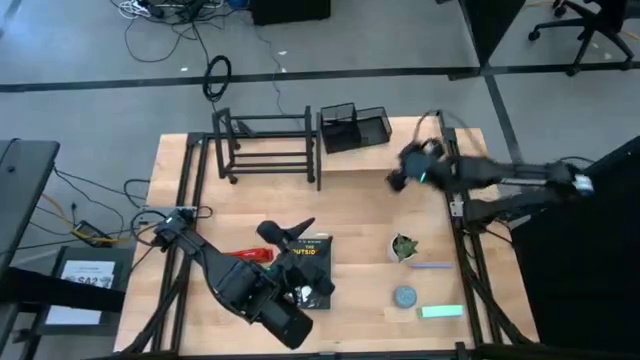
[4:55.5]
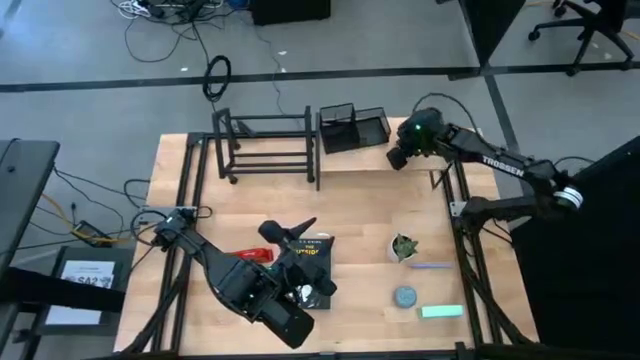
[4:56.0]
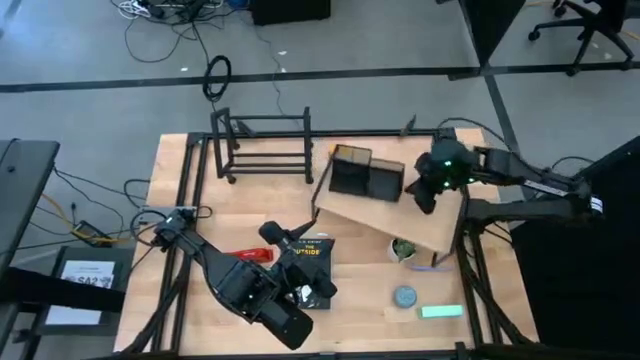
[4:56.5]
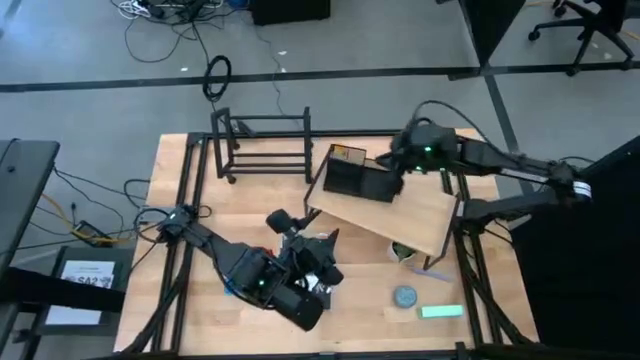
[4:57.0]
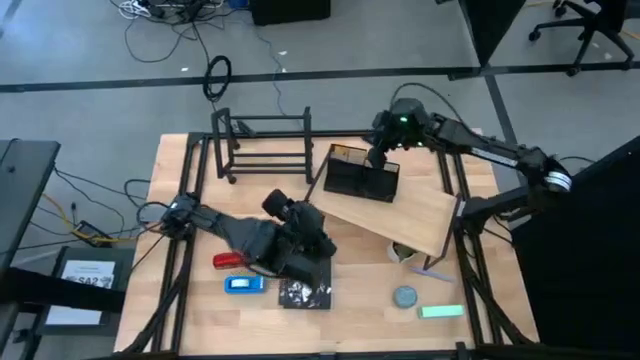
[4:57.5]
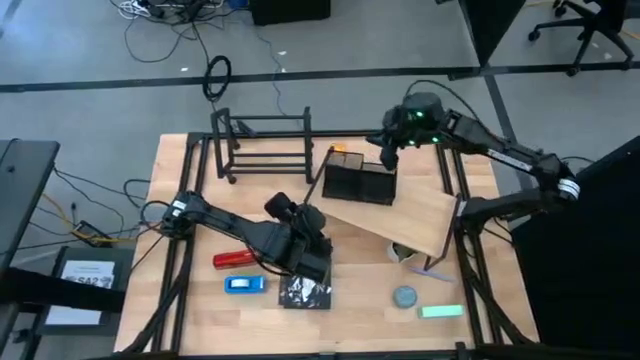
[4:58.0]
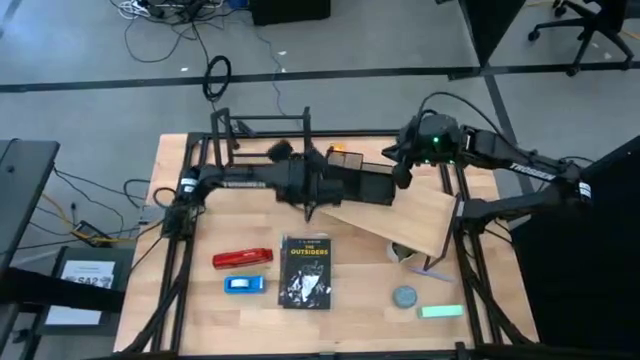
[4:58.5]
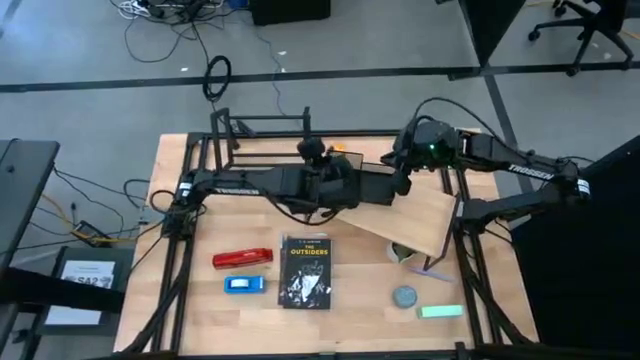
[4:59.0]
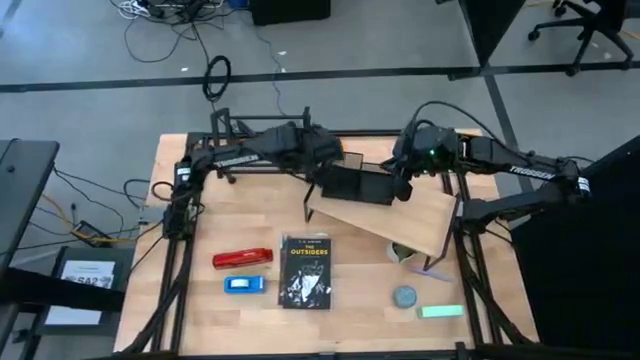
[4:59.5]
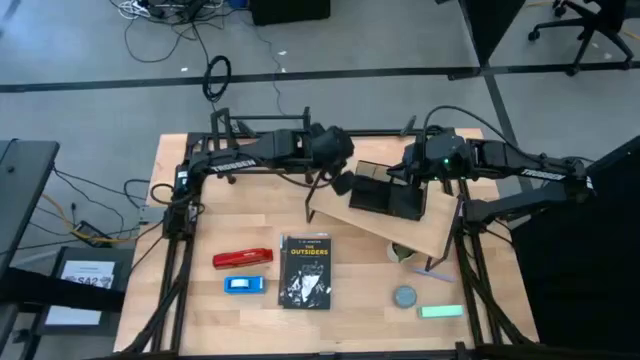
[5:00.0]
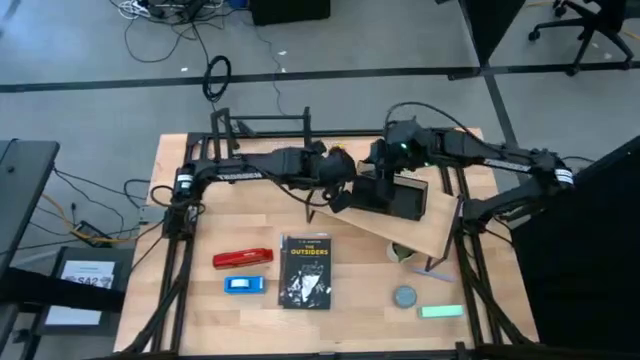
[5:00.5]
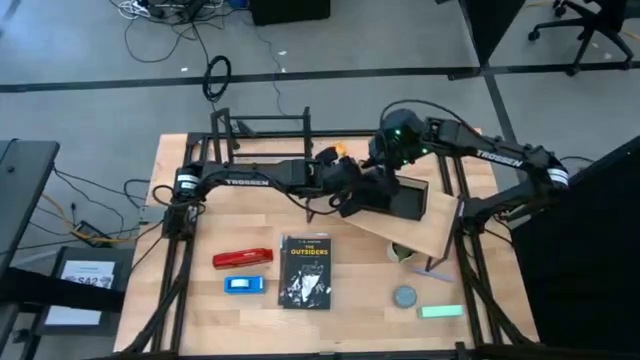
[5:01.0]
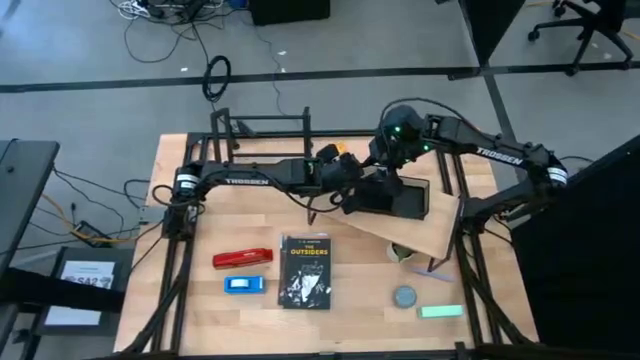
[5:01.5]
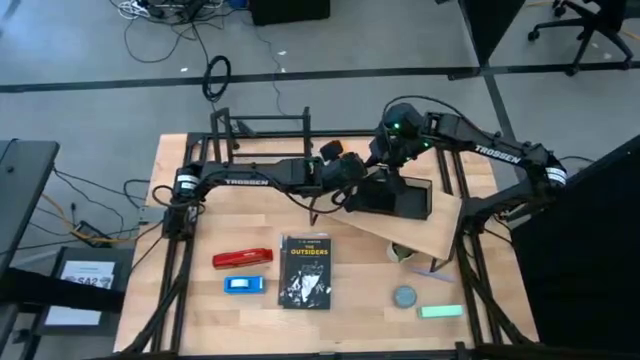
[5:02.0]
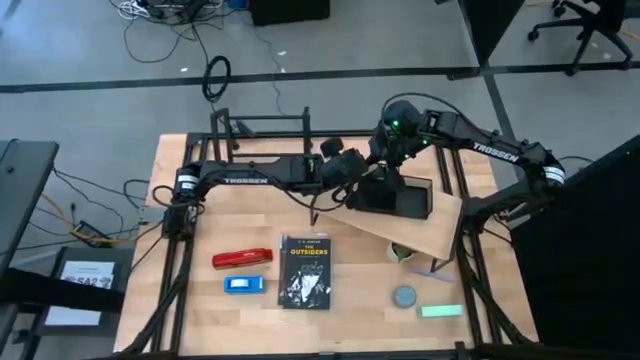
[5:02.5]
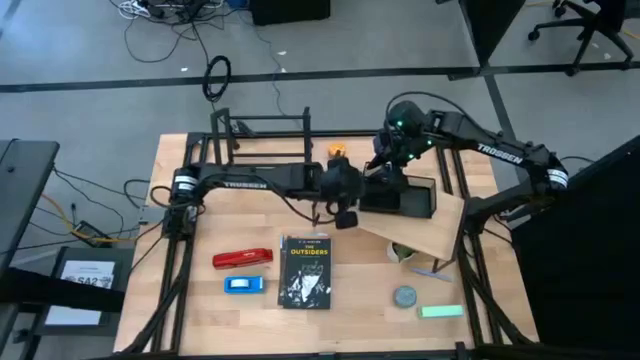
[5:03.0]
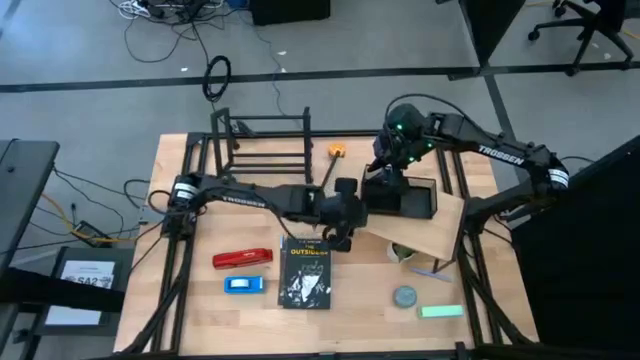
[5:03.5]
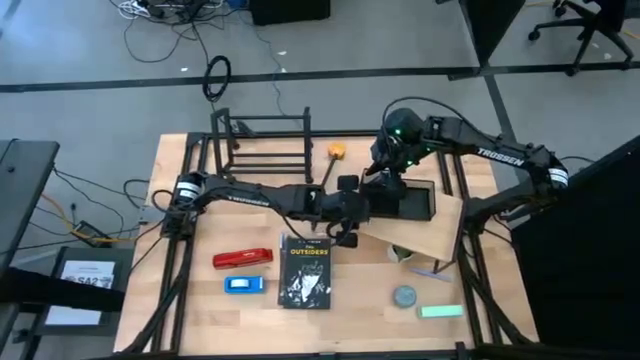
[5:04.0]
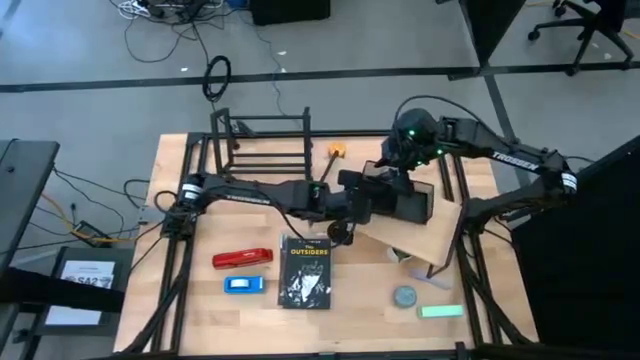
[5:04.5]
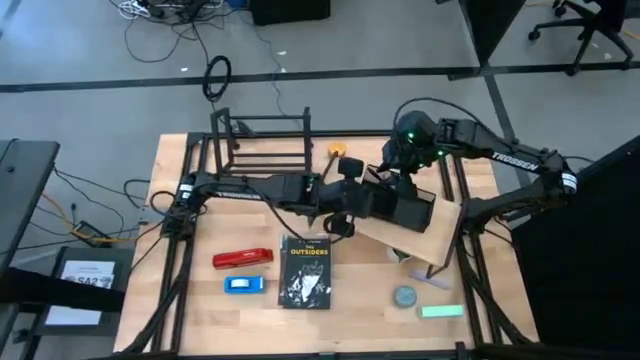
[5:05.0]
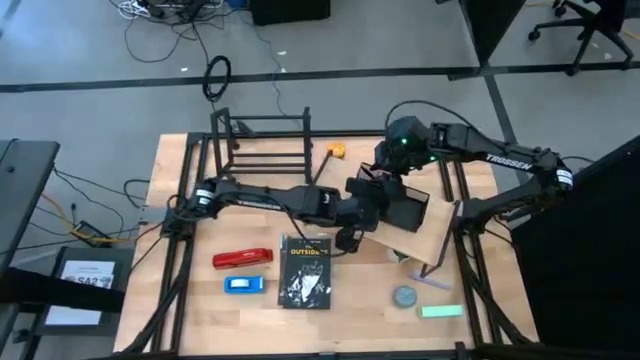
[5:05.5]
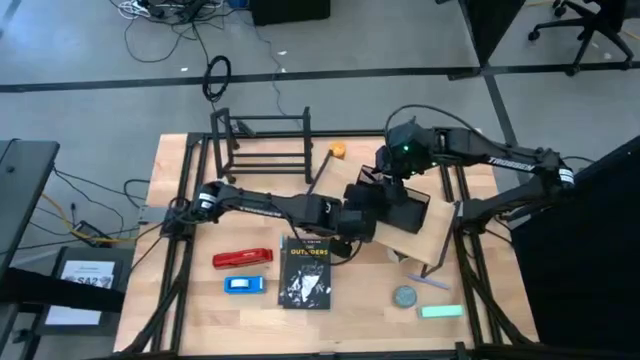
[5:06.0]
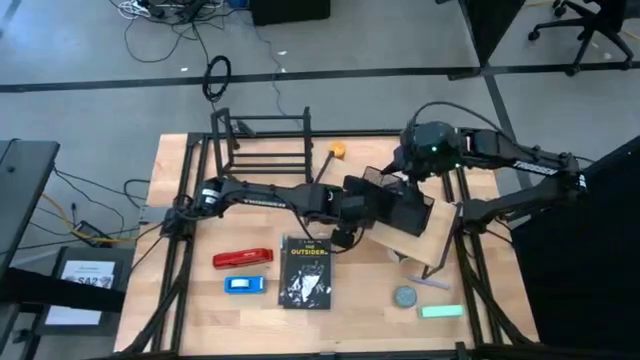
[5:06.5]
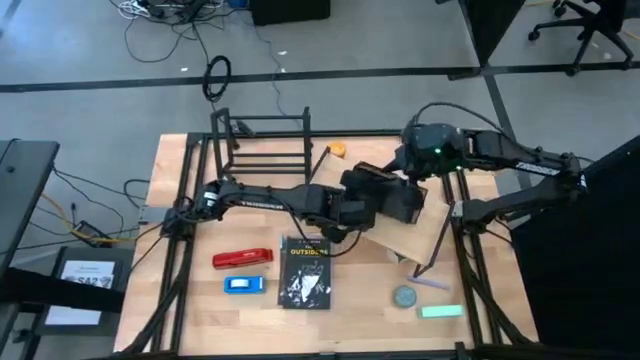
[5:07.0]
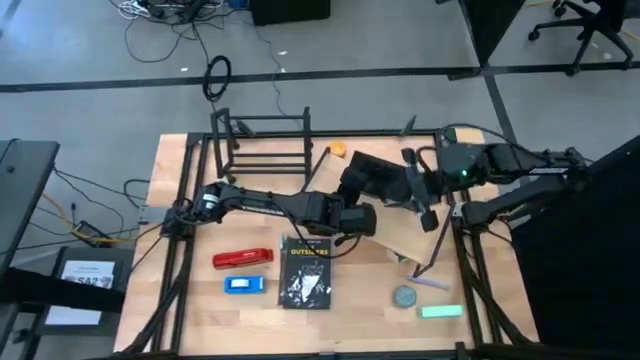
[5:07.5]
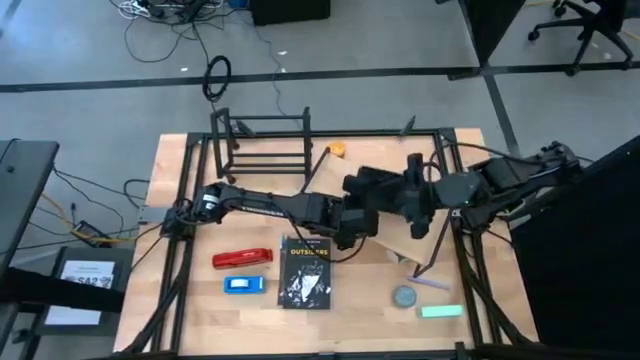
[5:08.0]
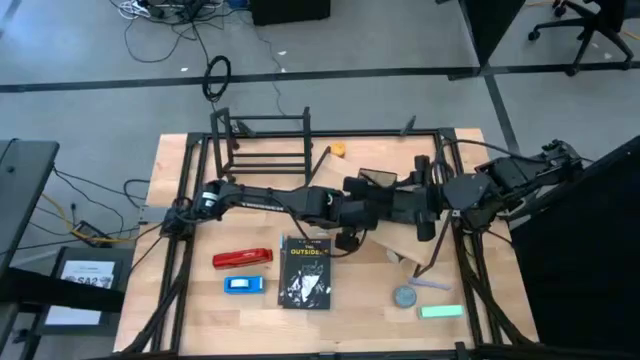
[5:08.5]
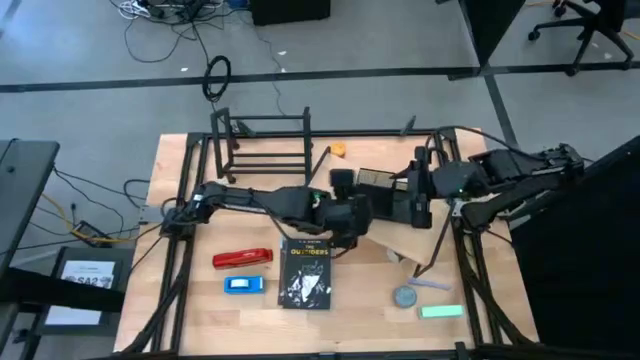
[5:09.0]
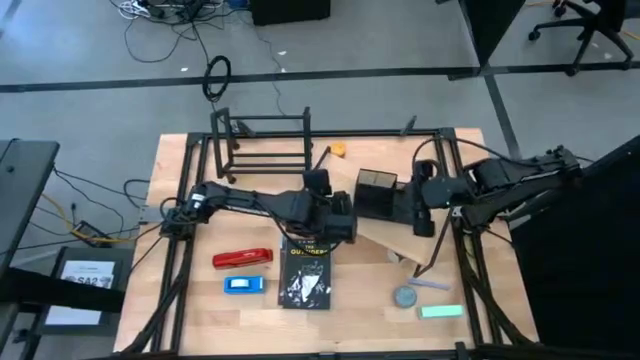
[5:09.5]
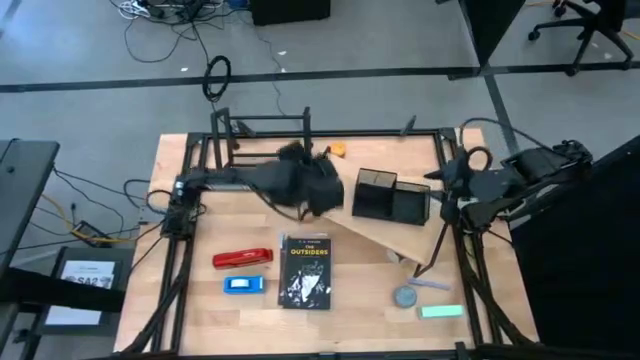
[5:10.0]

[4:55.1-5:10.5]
Task: Stock shelves
Adjust the shelf, pen holder and book shelf

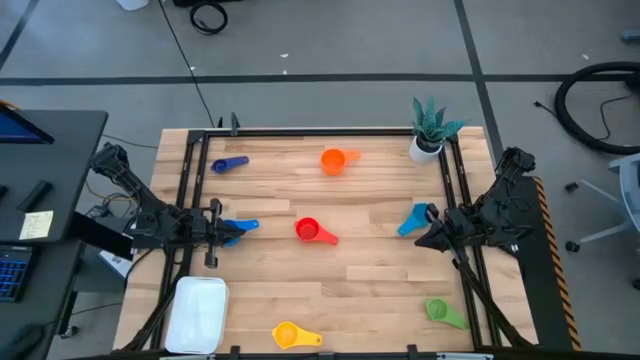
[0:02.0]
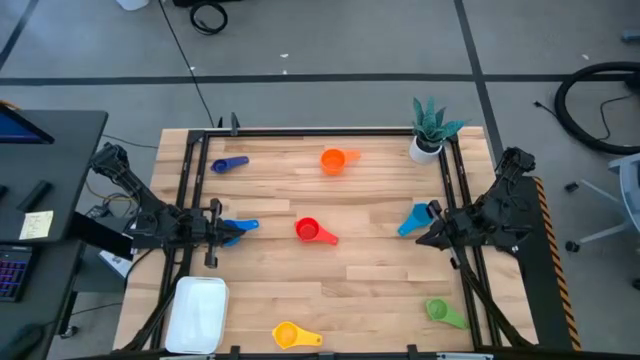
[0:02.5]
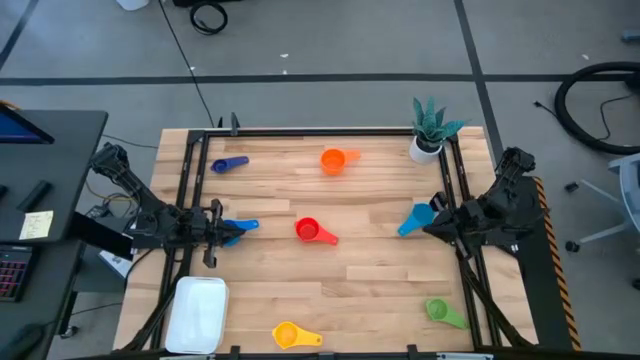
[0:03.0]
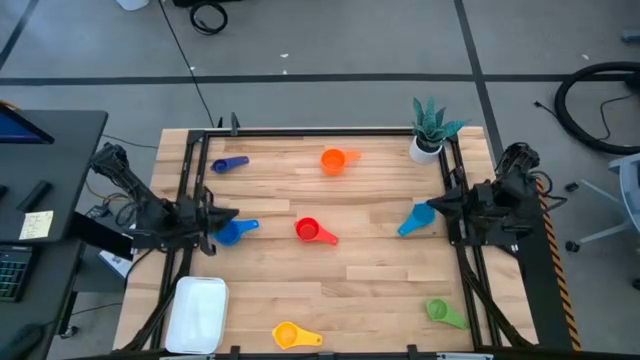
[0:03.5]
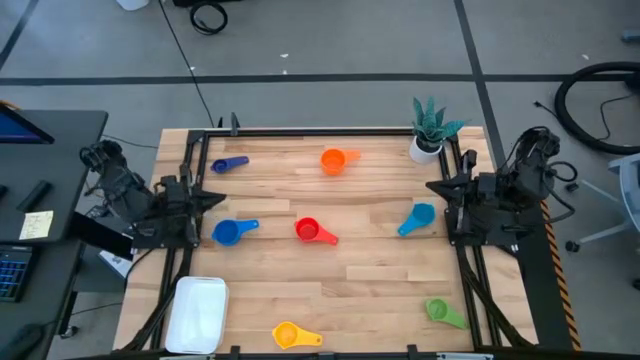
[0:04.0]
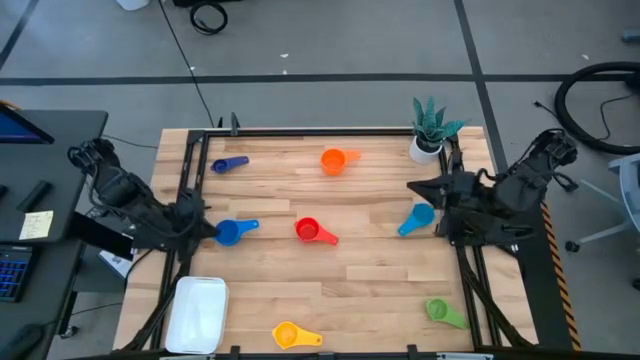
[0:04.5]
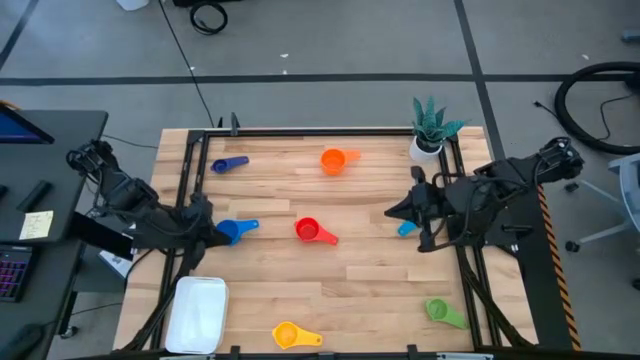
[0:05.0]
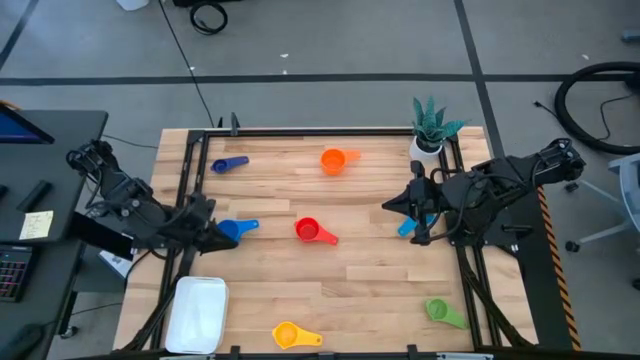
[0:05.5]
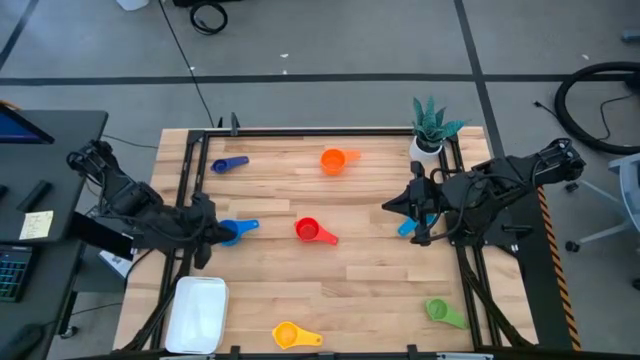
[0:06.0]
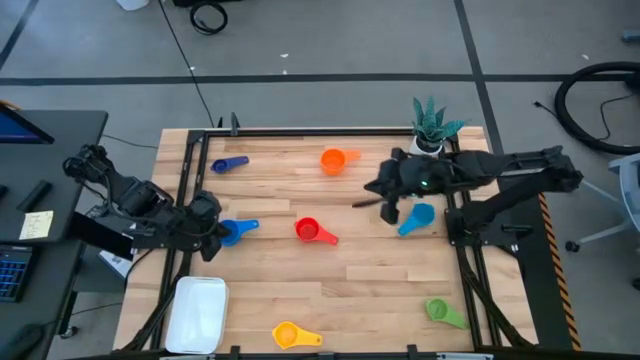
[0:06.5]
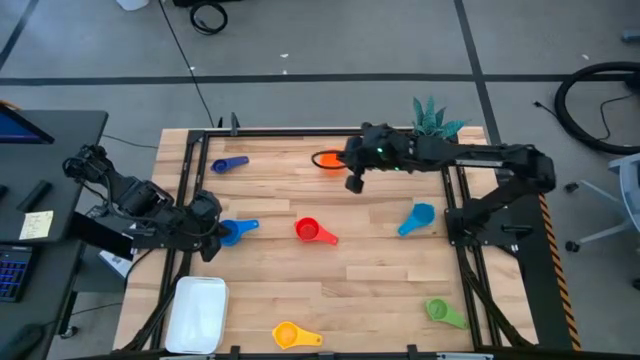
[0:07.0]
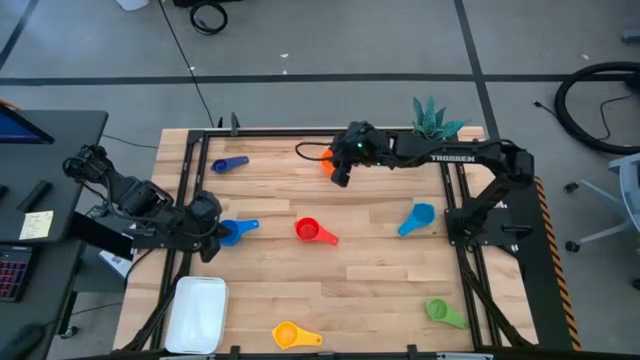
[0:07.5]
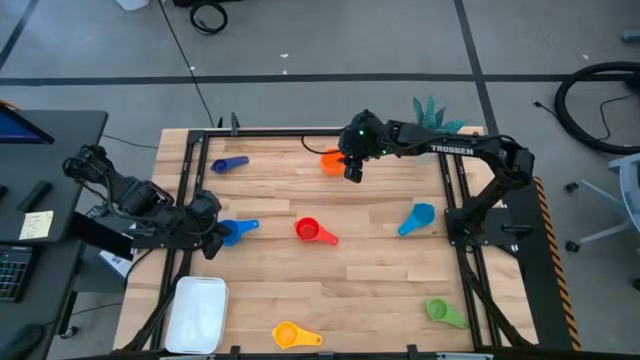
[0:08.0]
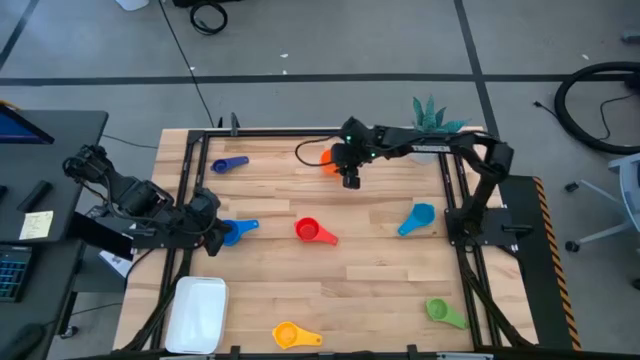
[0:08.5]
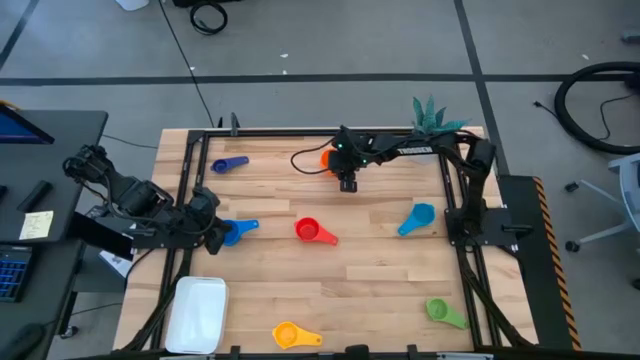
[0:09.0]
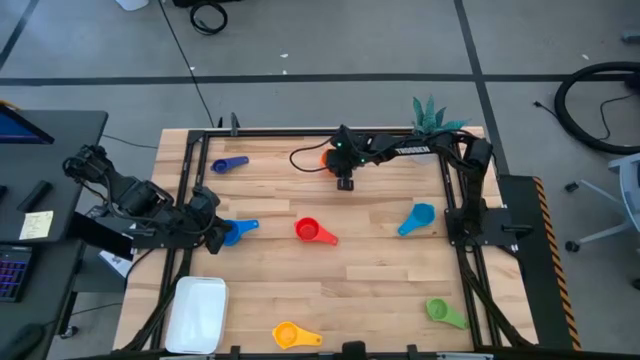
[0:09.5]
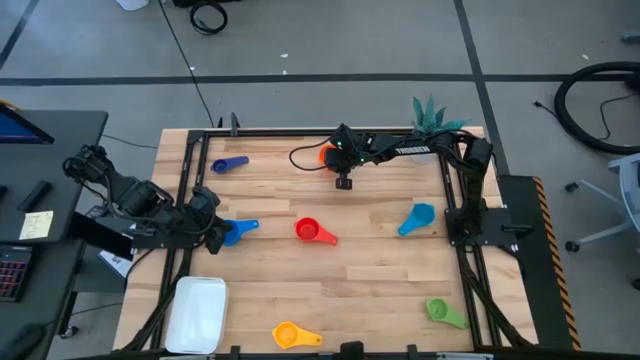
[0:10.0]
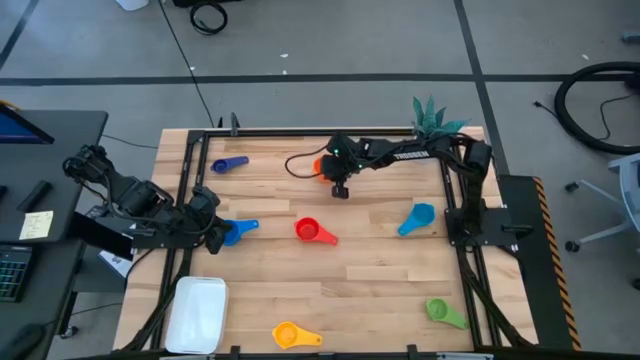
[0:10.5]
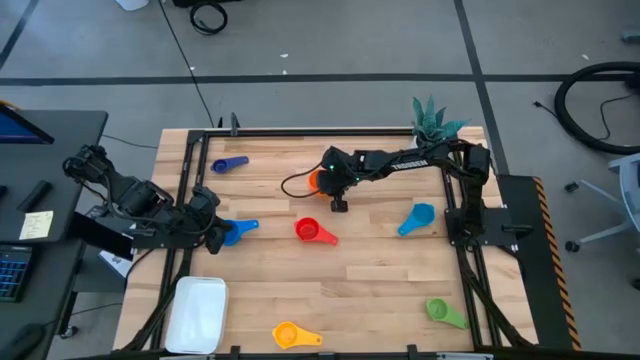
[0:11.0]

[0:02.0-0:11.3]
Task: Nest measuring cups in basket
Prepare the orange measuring cup
